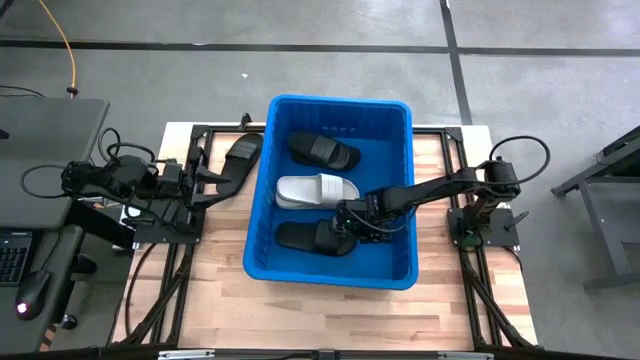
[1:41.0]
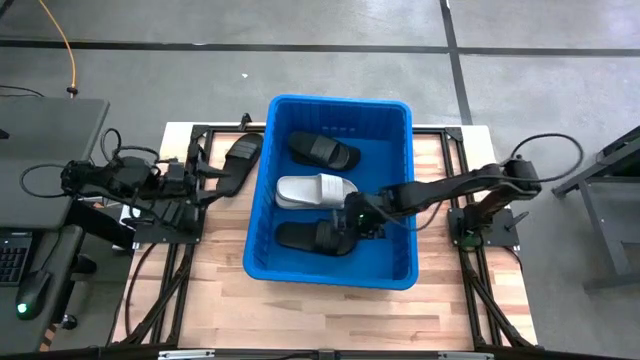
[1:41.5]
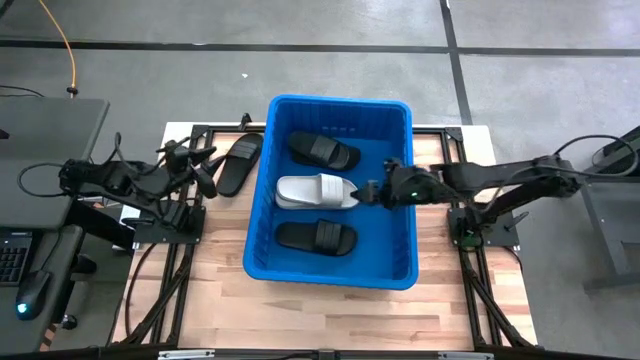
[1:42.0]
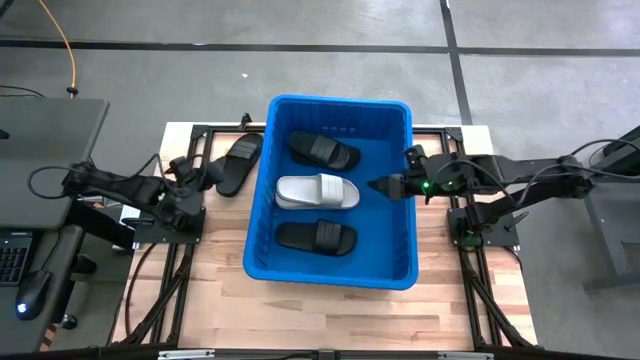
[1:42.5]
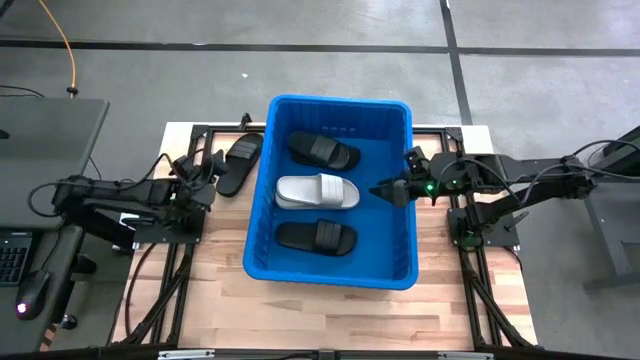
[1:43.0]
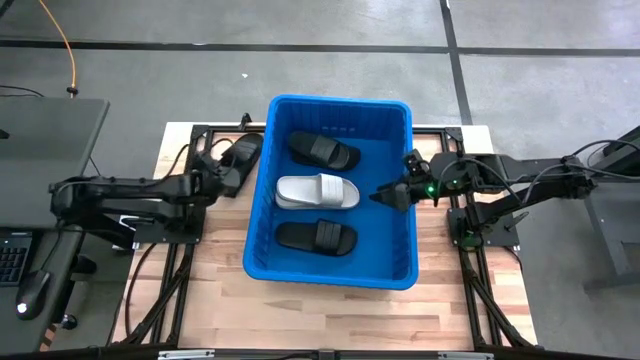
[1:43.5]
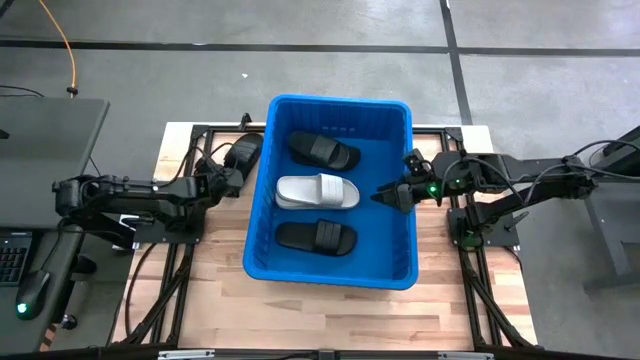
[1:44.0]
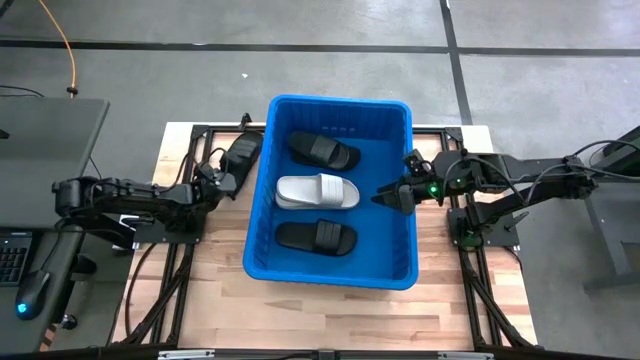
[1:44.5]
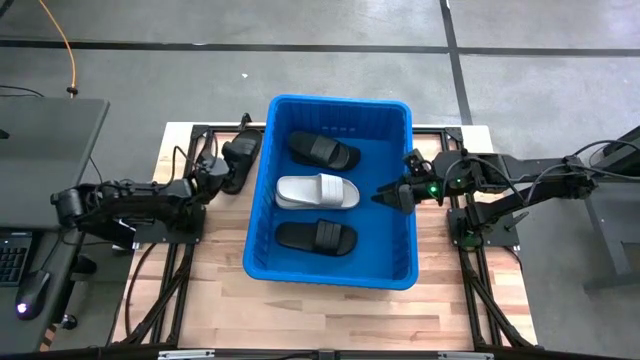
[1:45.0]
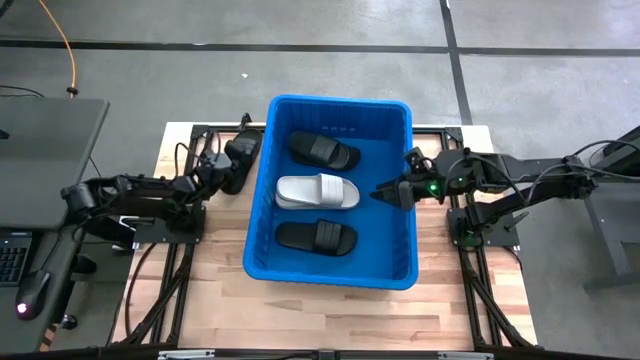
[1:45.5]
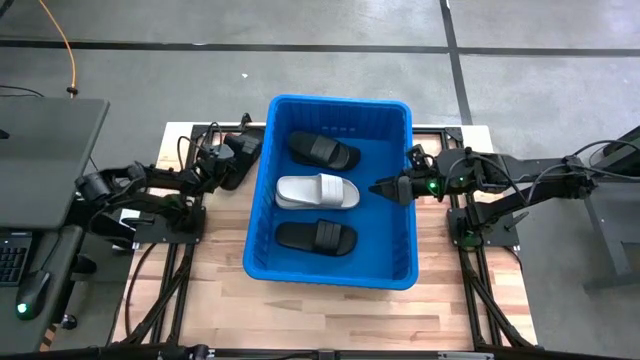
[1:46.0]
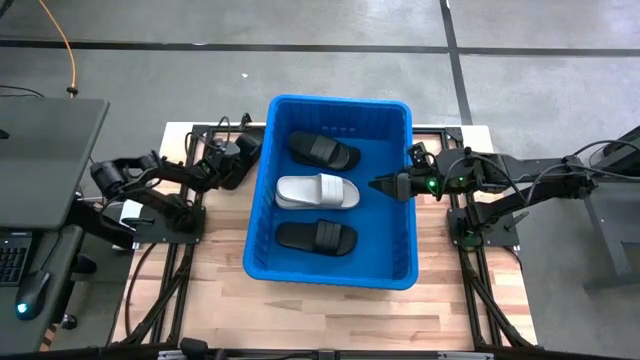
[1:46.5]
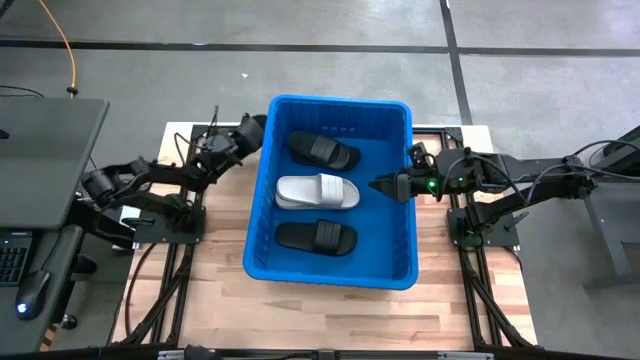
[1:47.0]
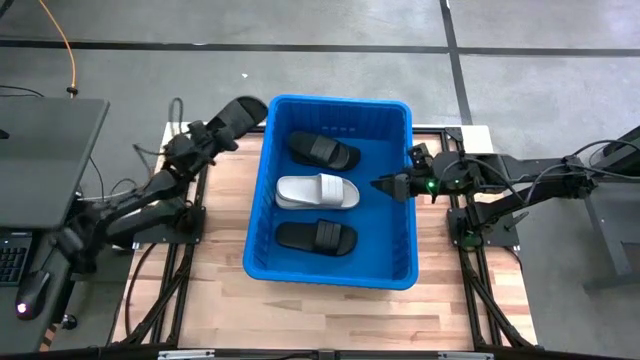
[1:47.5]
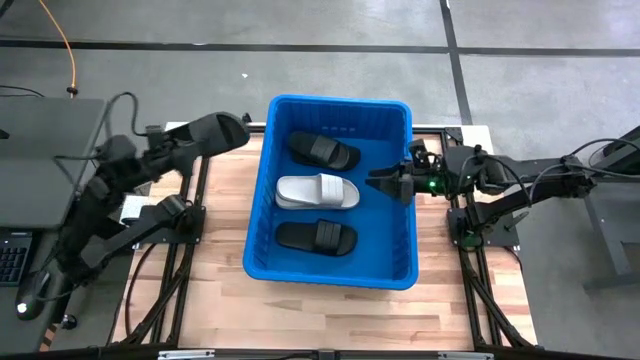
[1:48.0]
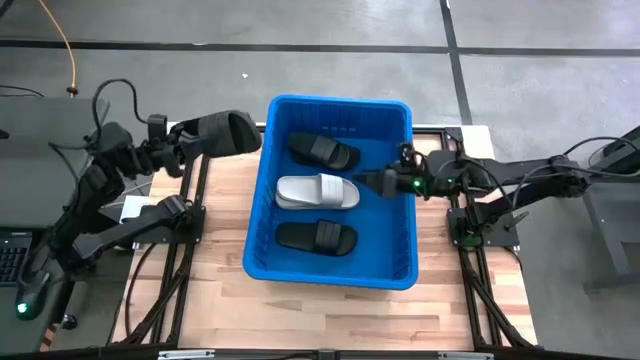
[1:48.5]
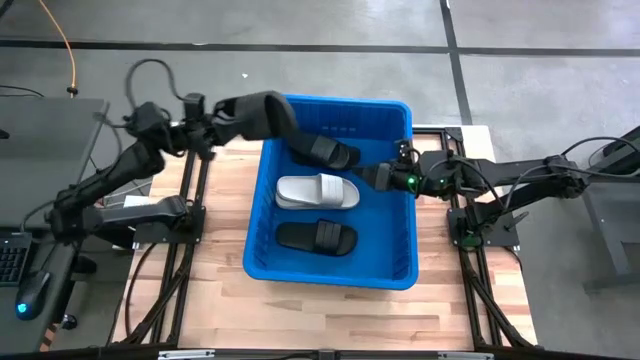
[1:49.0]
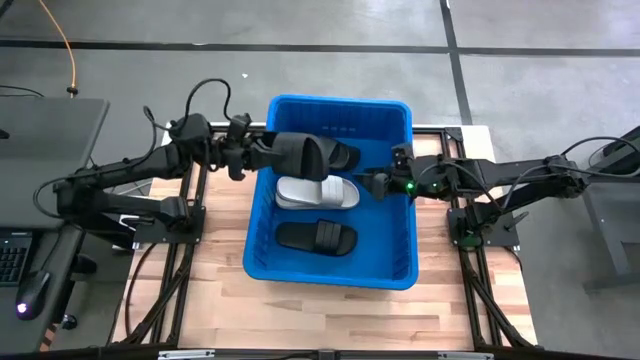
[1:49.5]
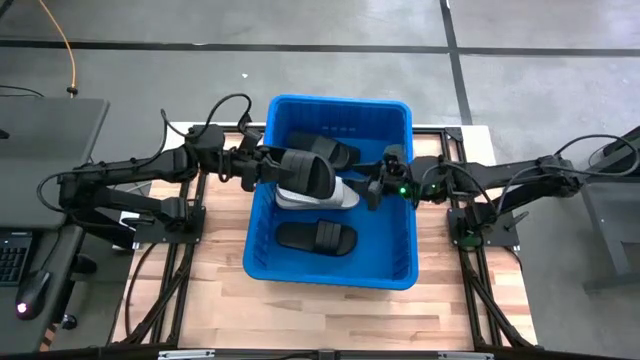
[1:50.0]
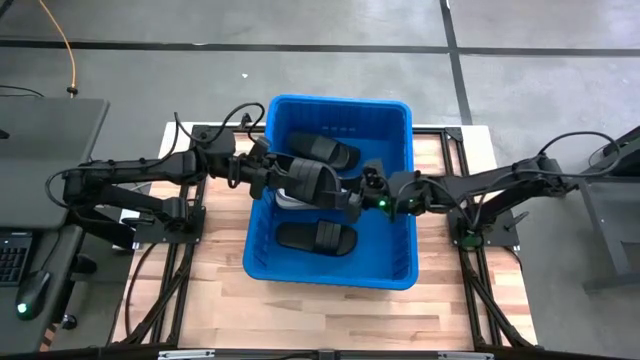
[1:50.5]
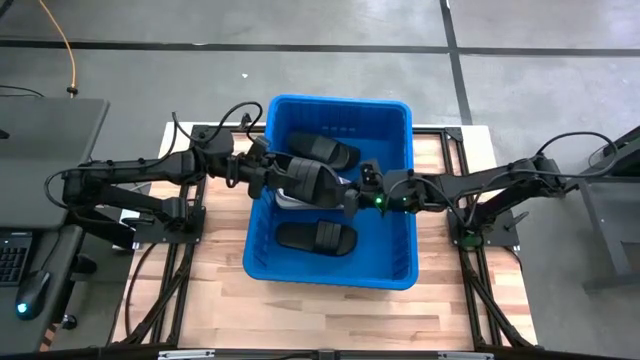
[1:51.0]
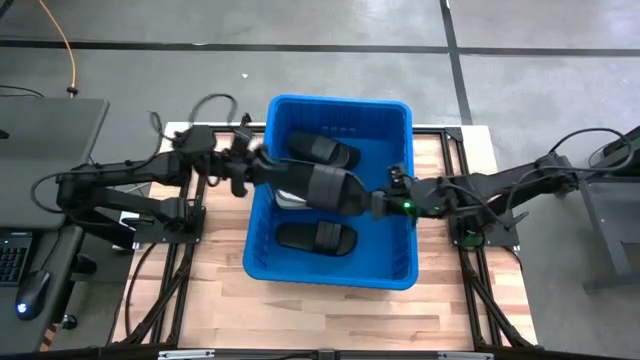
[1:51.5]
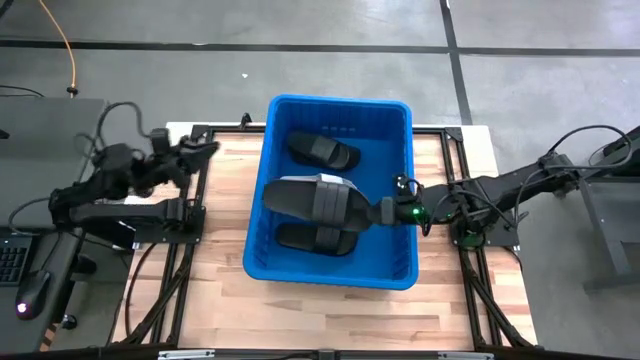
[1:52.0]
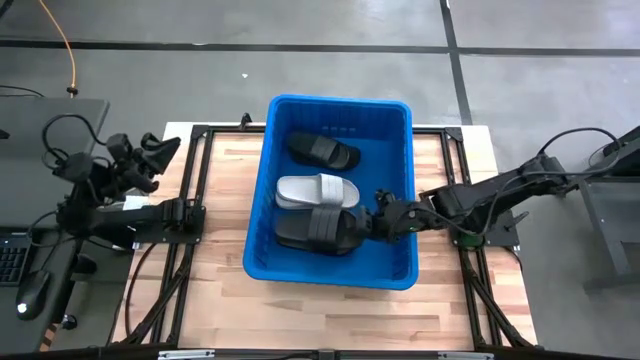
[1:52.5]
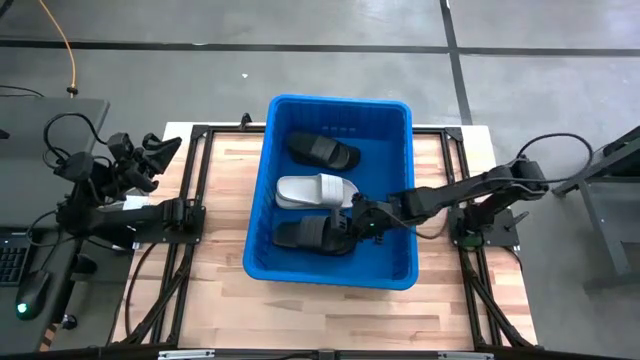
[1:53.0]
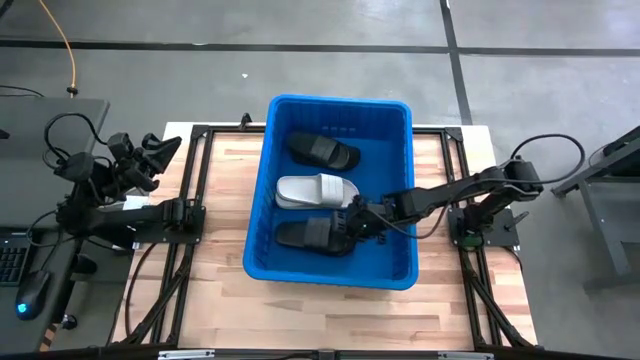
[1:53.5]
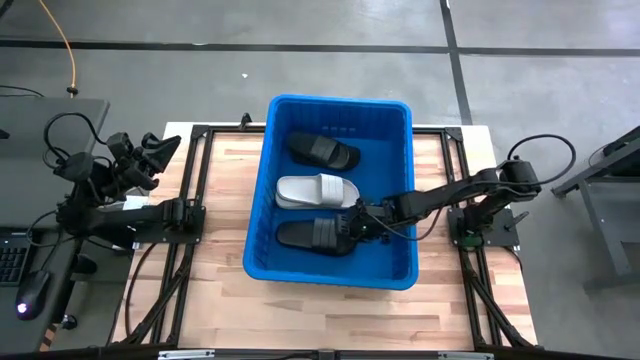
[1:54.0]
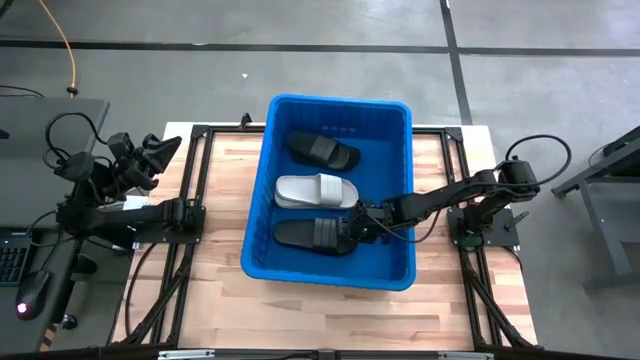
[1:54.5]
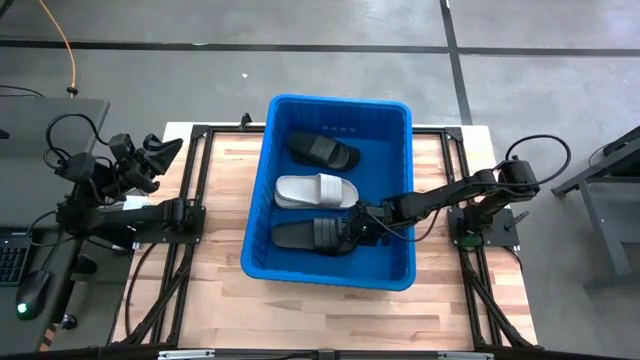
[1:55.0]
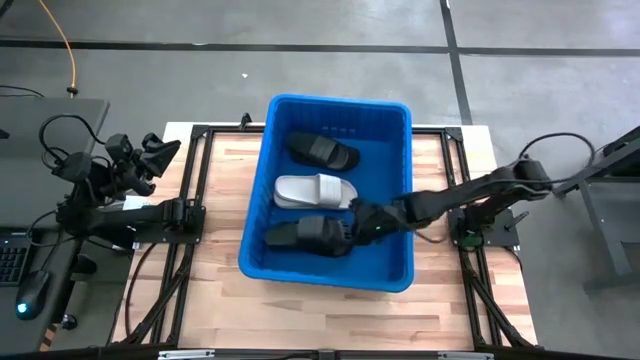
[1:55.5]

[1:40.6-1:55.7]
Task: Pick and place slides into bin
Put the black slide into the blue container

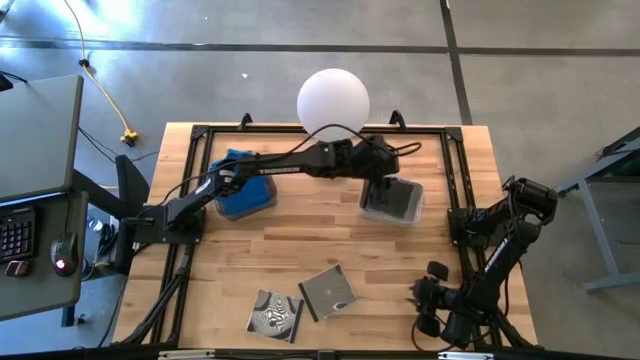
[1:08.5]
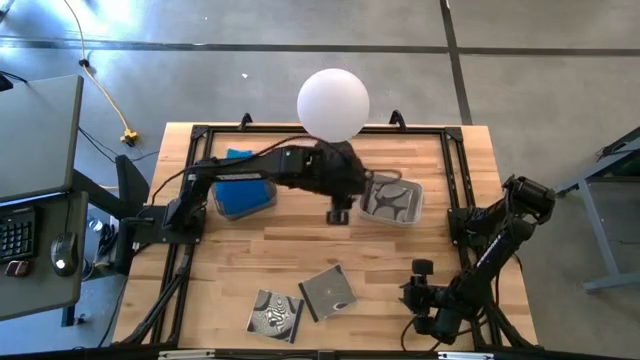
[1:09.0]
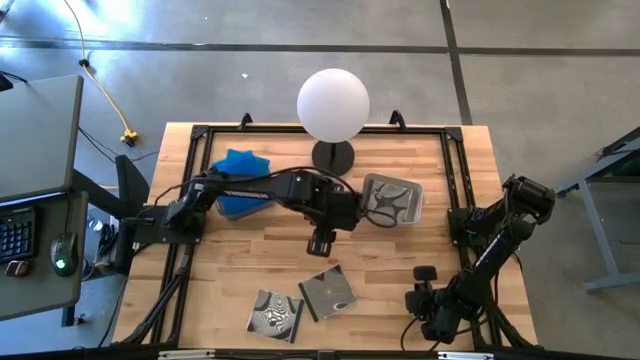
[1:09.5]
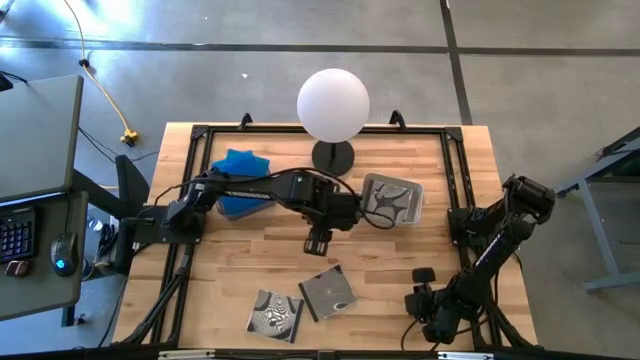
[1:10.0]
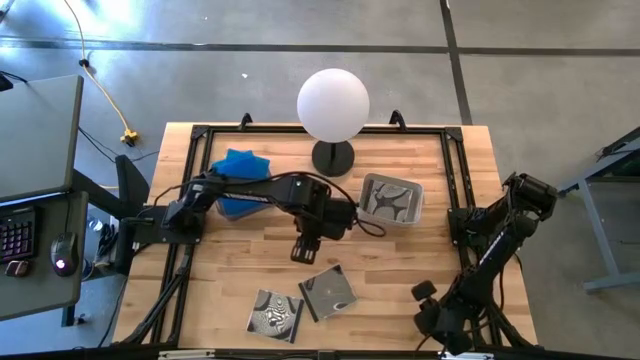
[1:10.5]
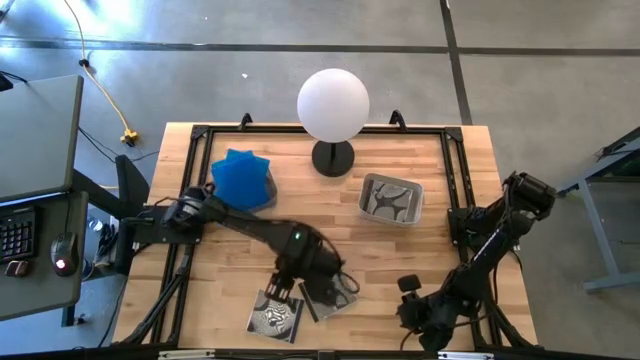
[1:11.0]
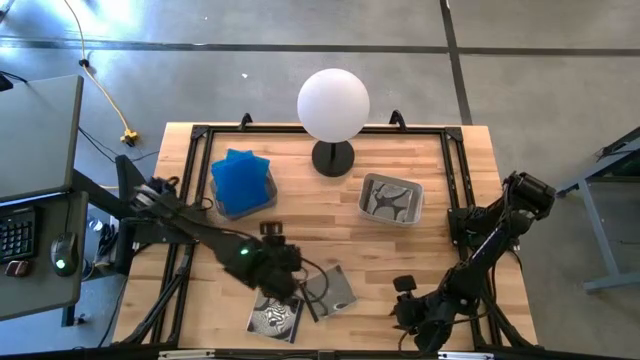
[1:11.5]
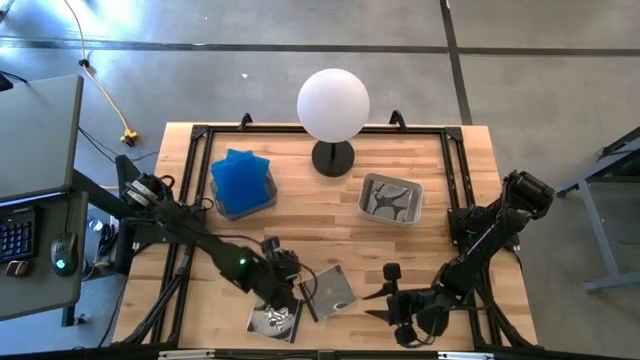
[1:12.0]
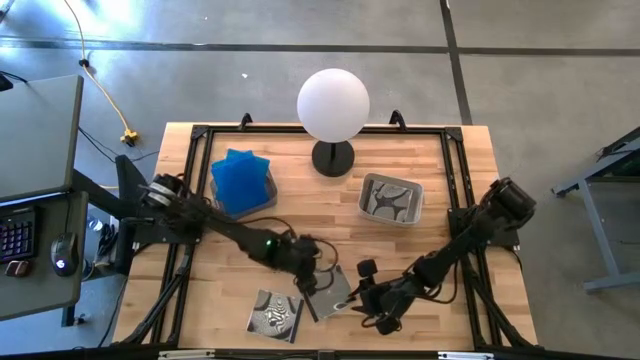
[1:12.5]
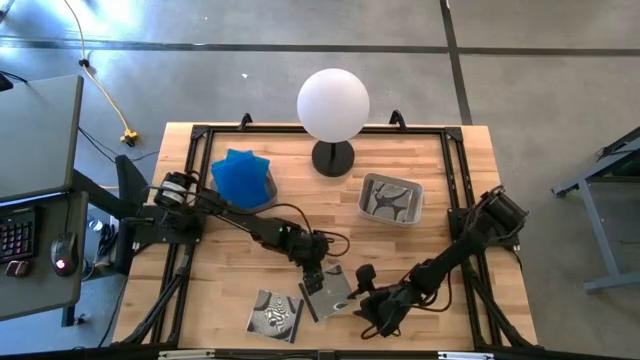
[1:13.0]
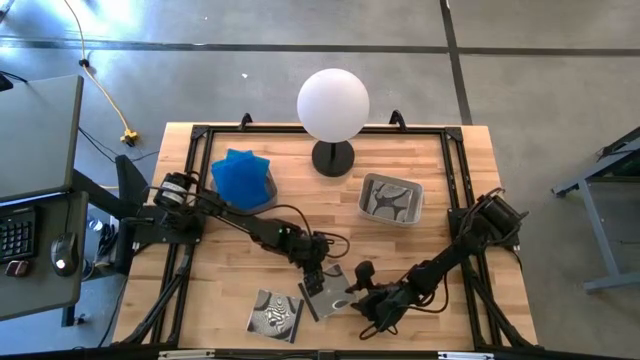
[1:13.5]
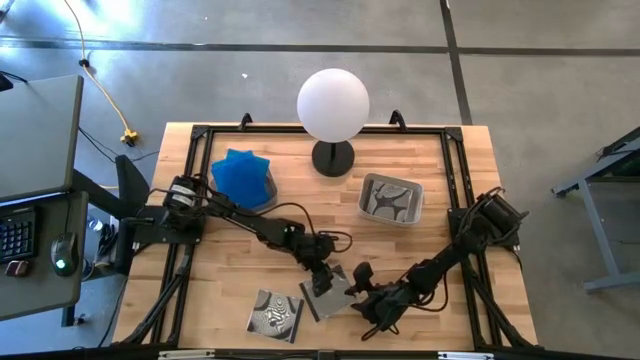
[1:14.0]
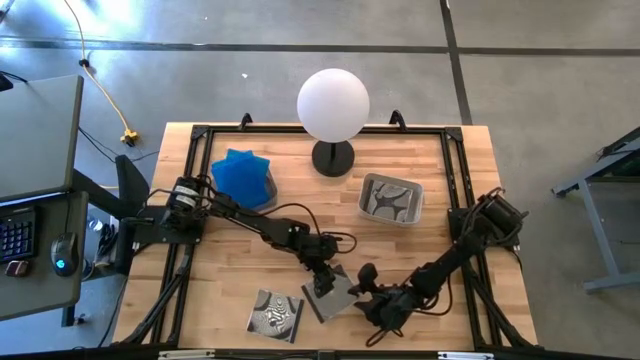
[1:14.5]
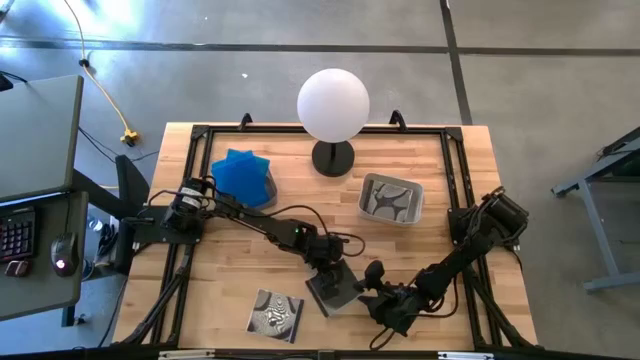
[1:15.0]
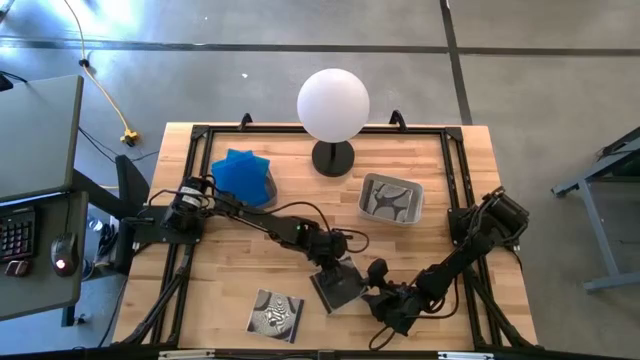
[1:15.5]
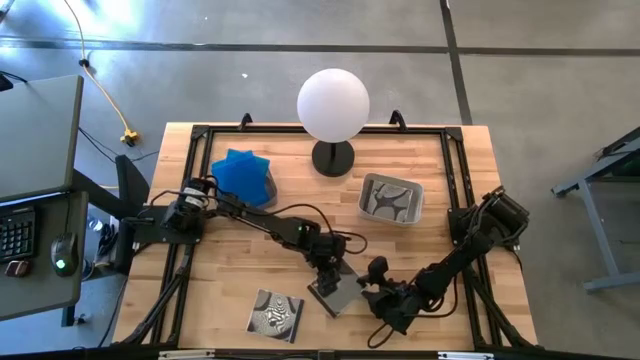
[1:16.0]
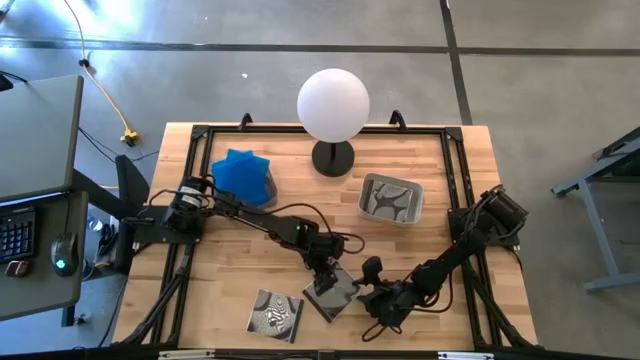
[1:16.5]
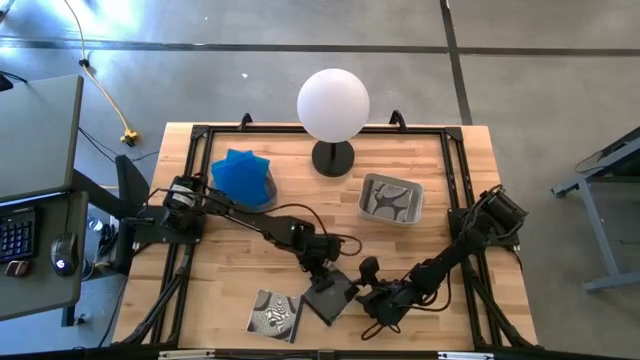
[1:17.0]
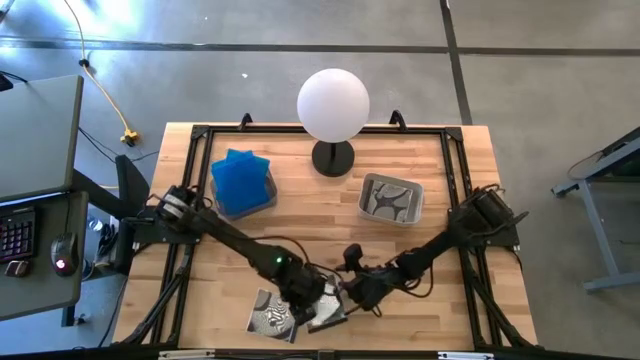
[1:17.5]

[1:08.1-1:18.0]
Task: Pick & place jewel cases by type
Put the right black cd case into the gray bin
